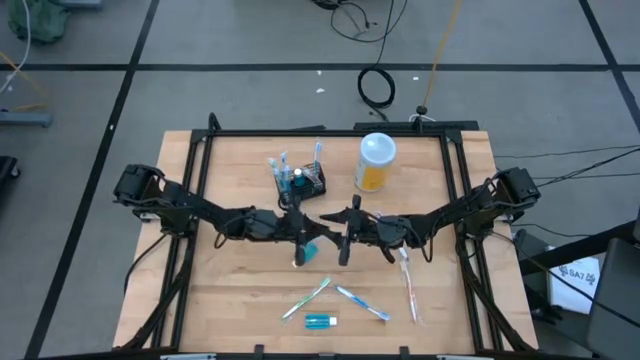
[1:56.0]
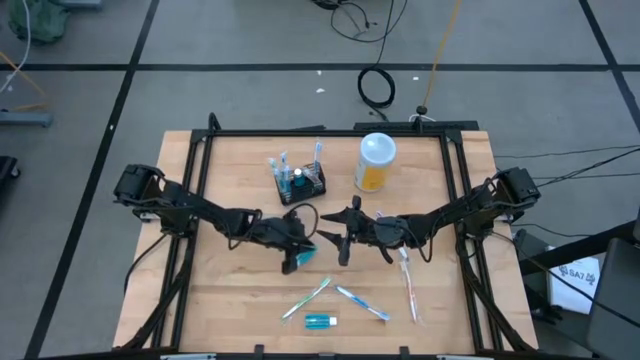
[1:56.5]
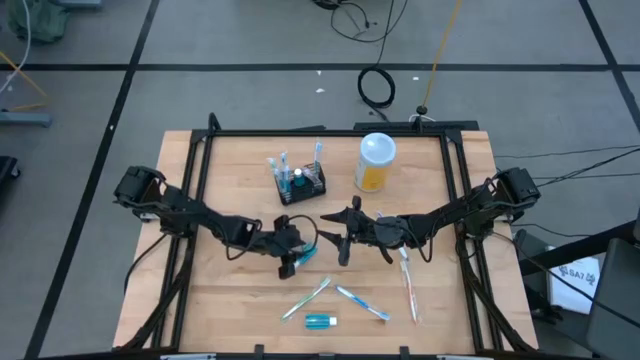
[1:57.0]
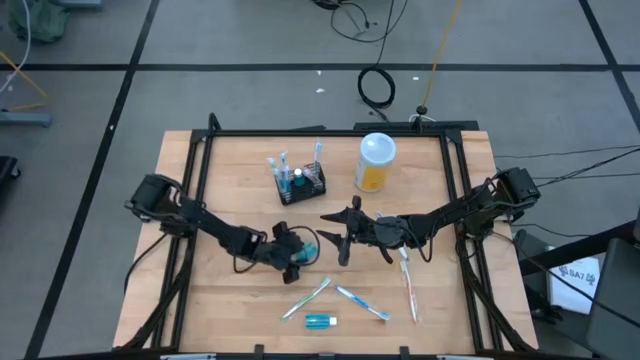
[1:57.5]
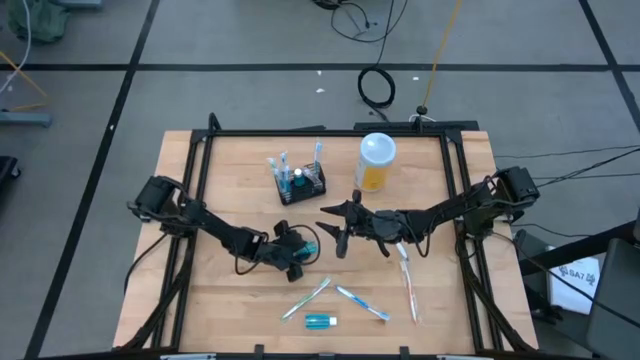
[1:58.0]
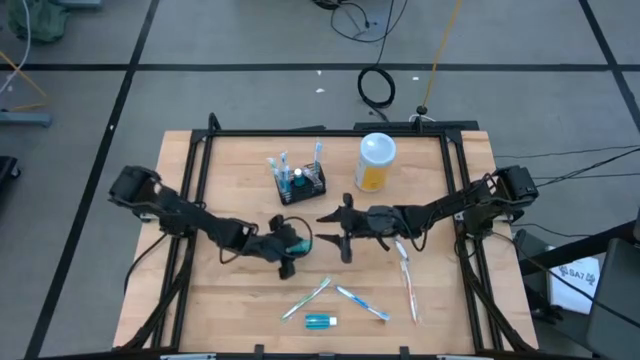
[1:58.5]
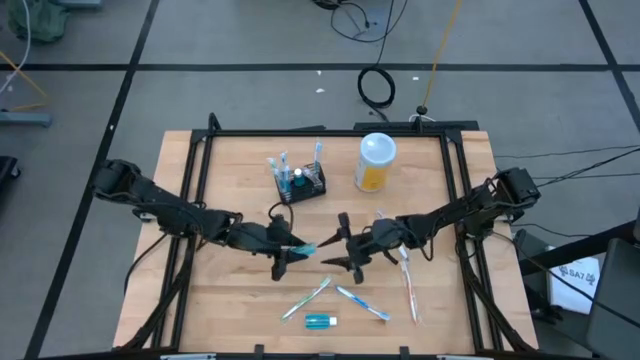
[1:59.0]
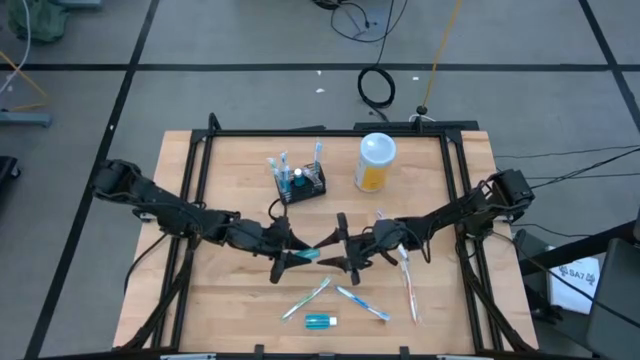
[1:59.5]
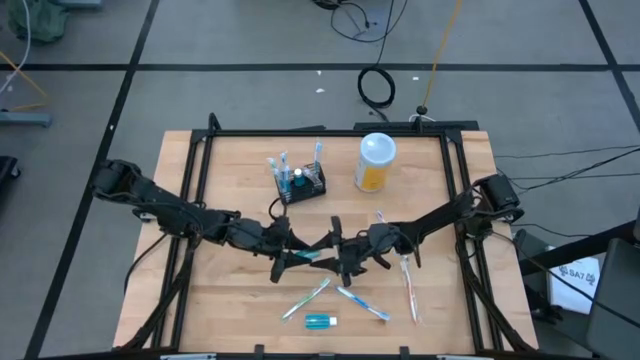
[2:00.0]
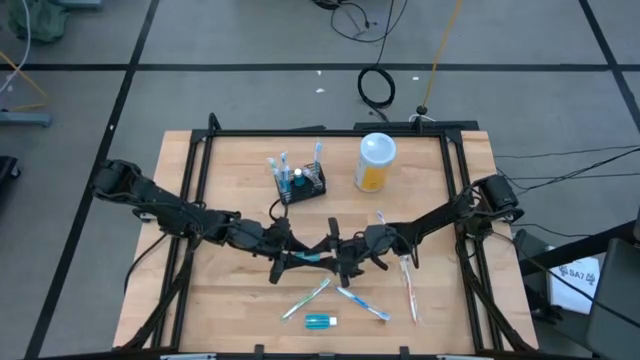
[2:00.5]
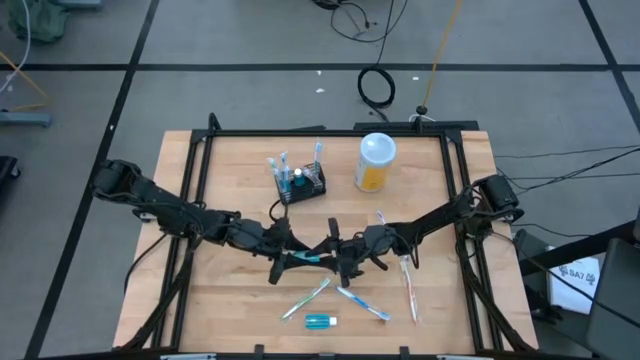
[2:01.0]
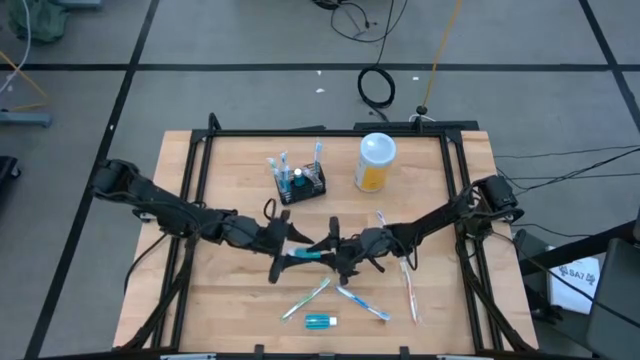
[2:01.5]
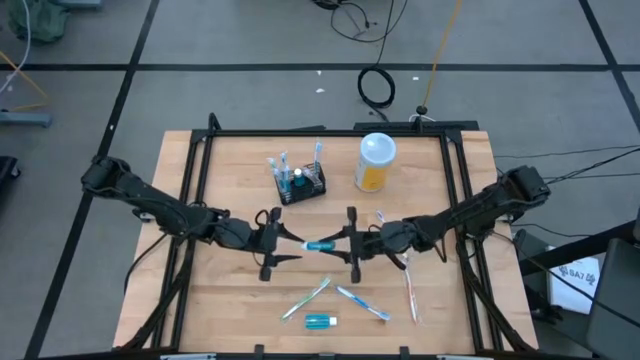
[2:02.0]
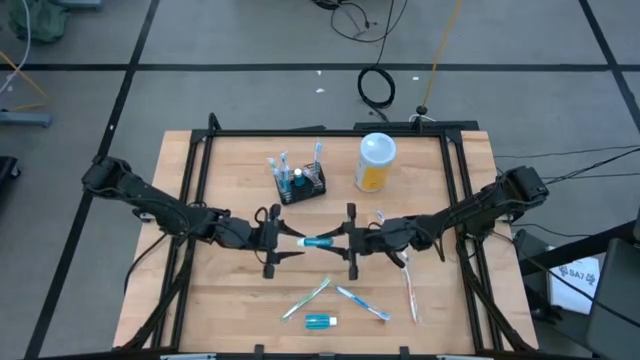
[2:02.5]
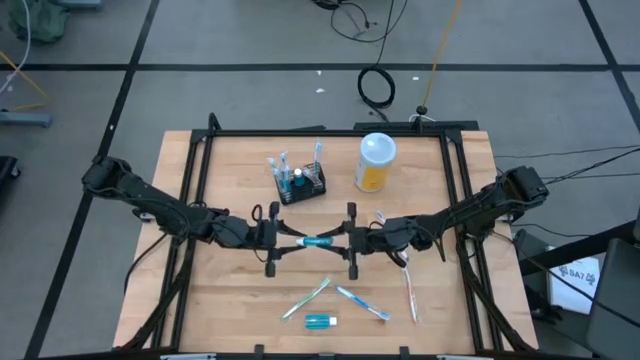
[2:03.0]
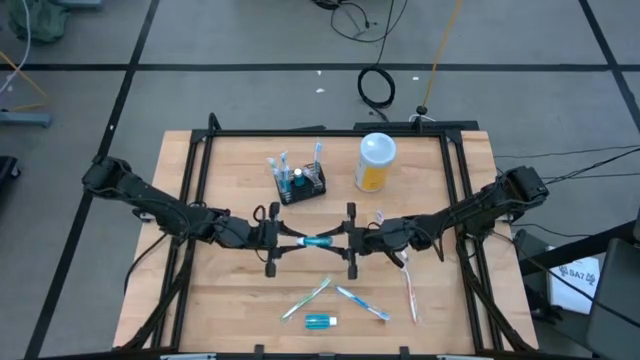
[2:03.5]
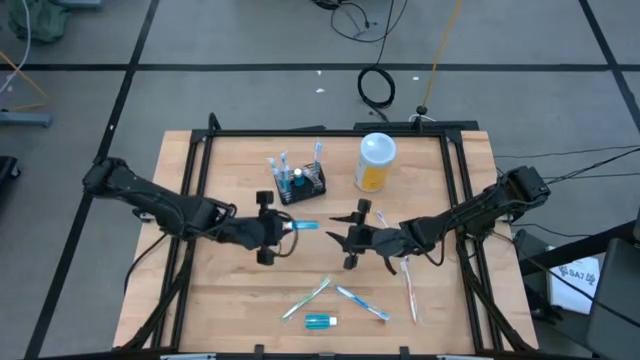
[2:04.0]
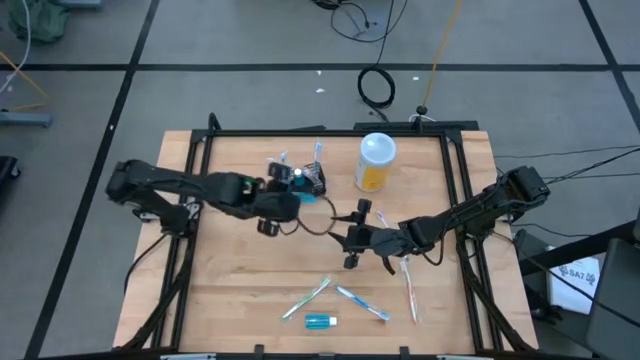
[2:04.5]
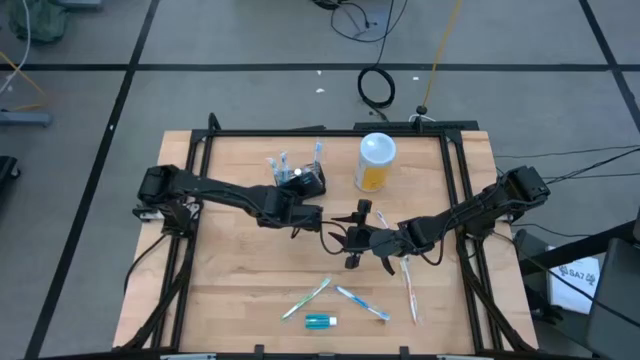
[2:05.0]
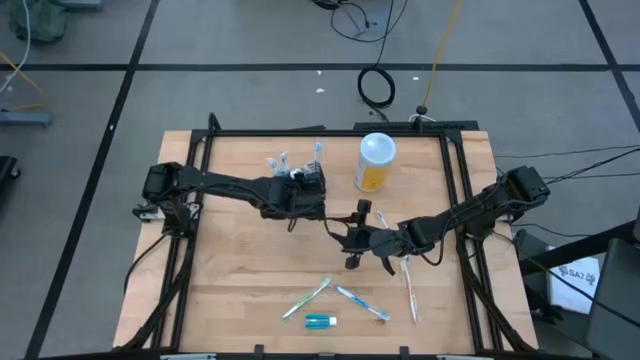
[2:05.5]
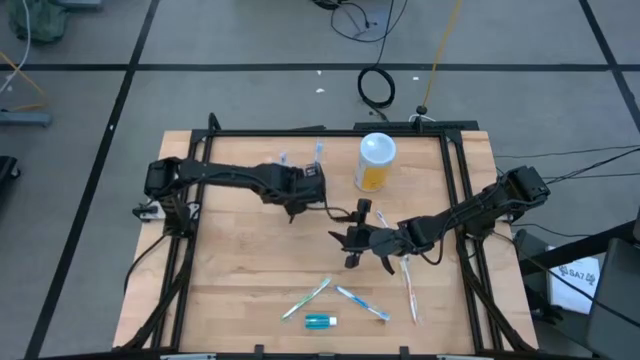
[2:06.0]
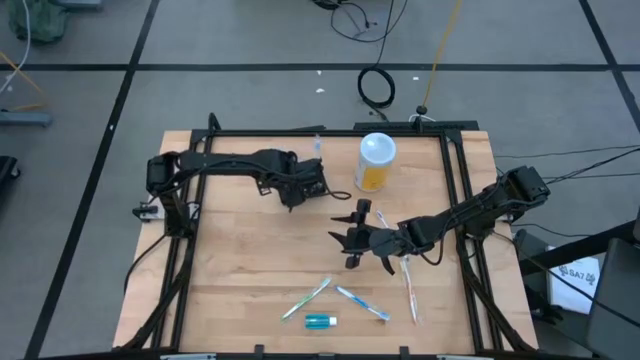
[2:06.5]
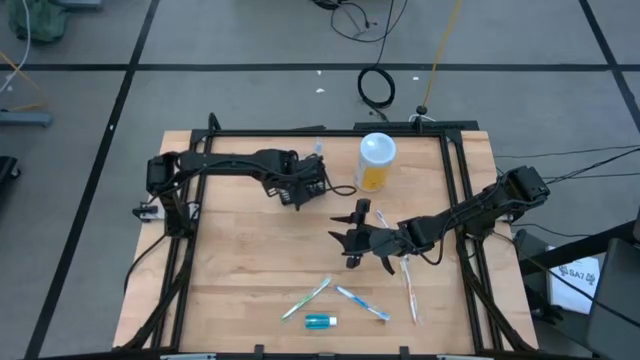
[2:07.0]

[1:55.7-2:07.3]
Task: Pick & Place toothbrushing station
Put the blue mouthwash into the black mesh organizer

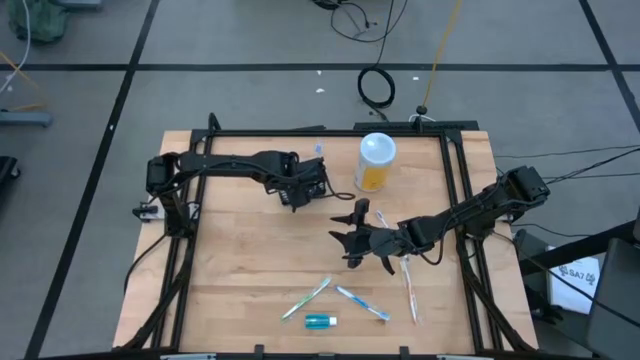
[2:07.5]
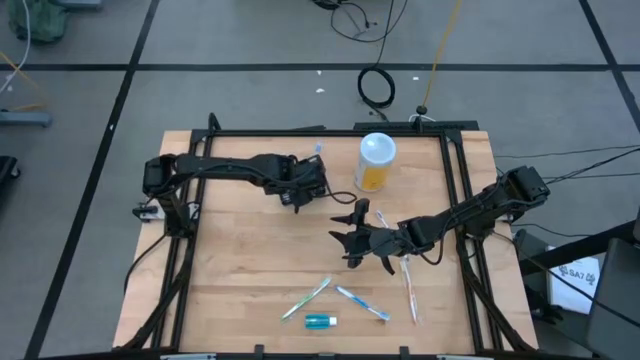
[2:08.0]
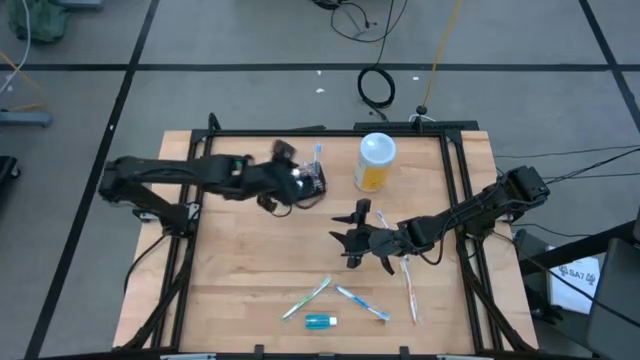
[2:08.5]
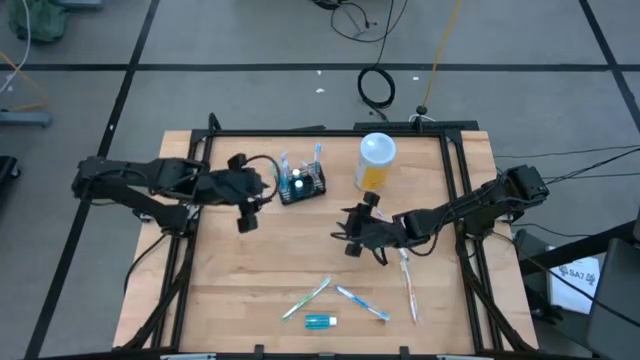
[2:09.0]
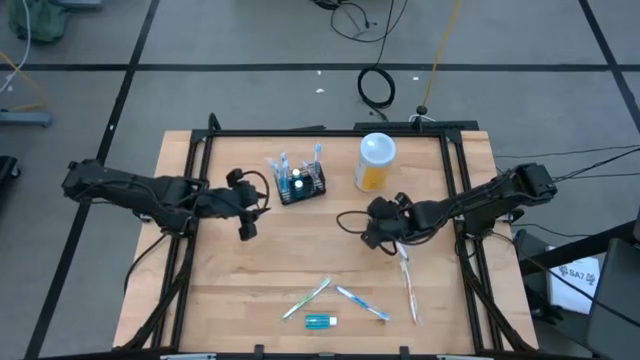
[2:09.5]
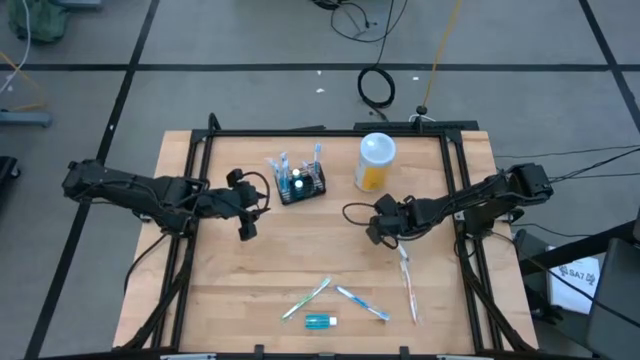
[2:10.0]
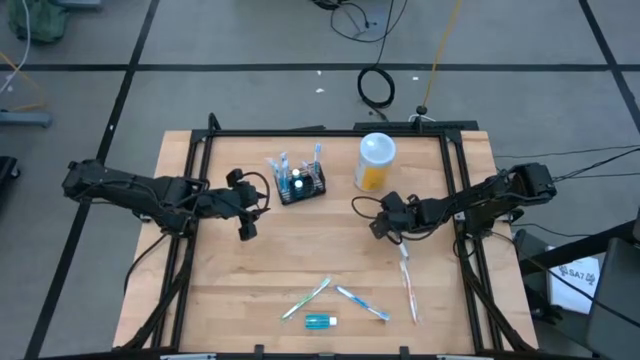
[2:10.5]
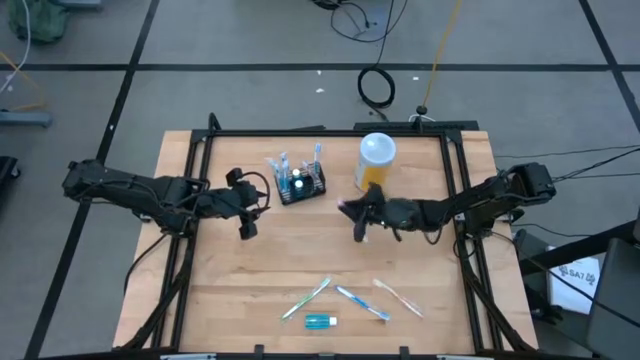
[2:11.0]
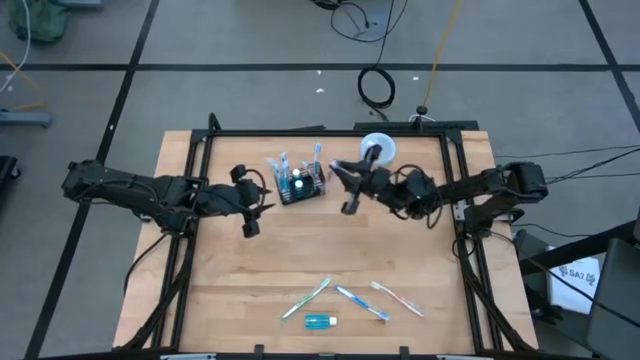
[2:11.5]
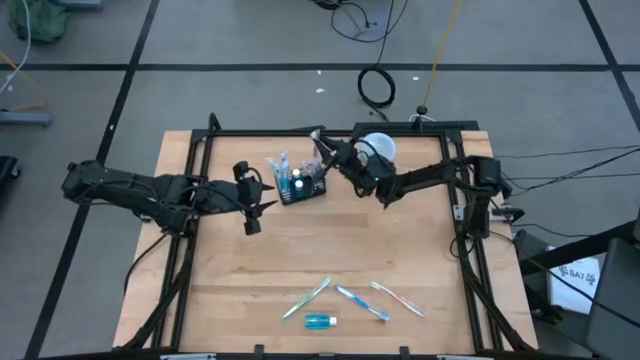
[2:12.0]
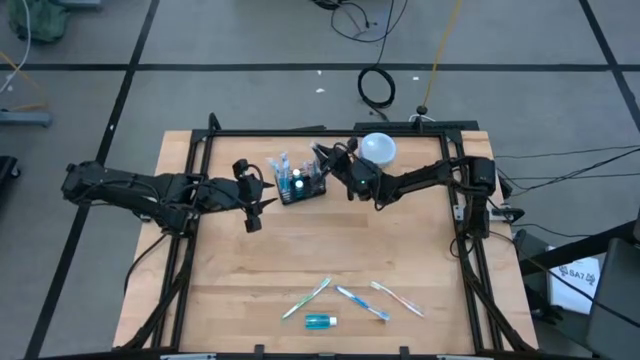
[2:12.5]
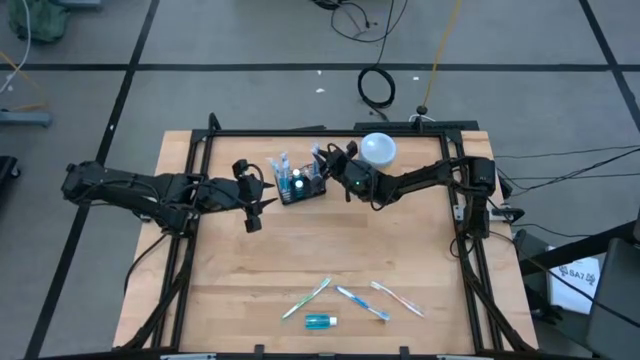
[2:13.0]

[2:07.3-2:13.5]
Put the purple toothbrush into the black mesh organizer

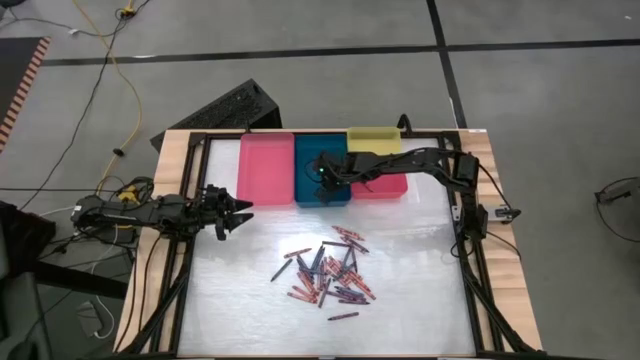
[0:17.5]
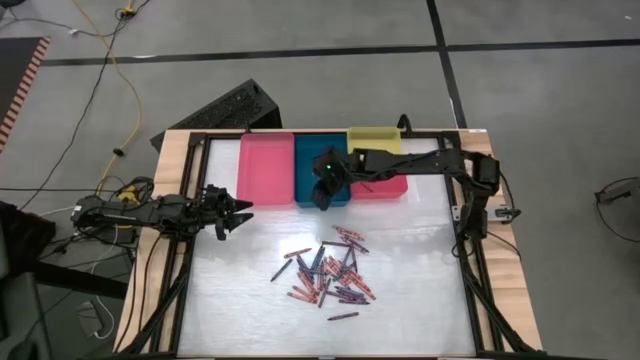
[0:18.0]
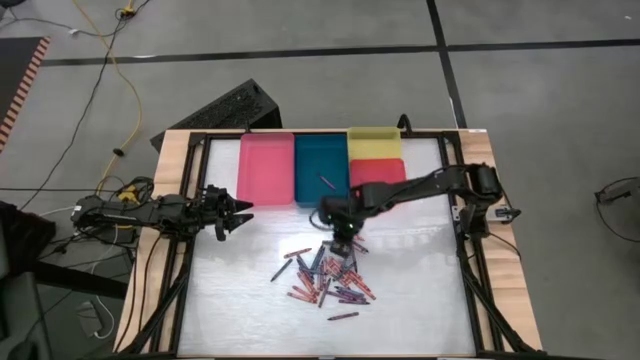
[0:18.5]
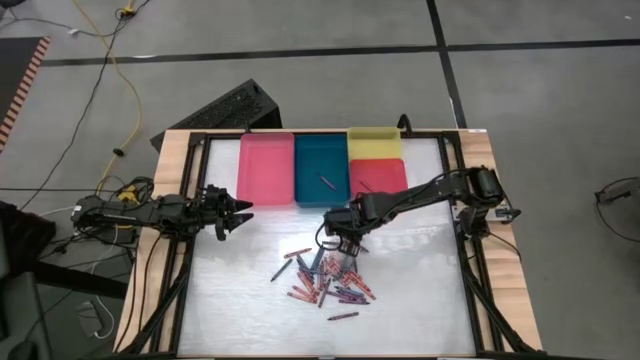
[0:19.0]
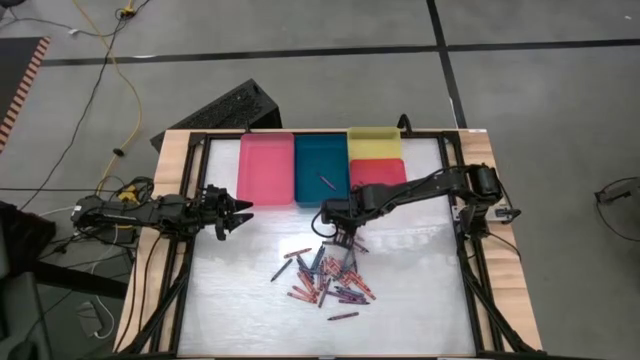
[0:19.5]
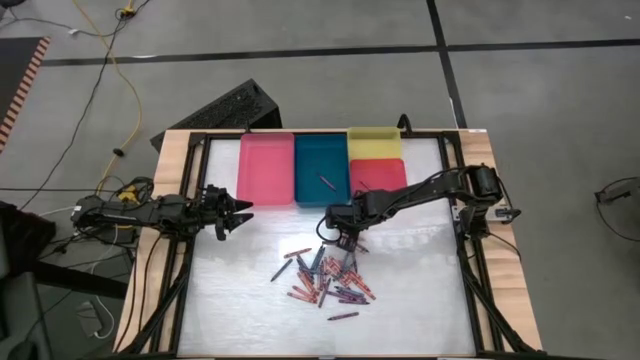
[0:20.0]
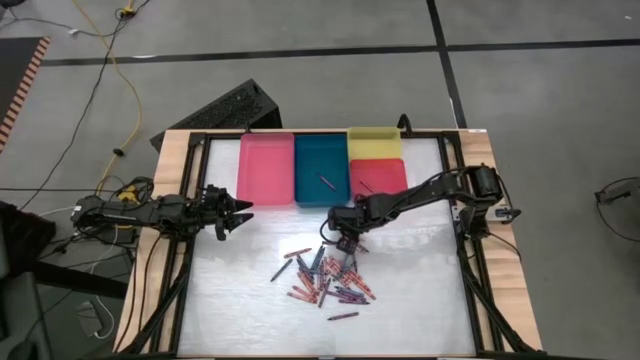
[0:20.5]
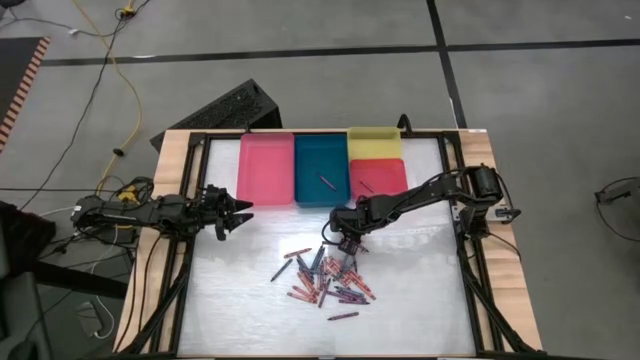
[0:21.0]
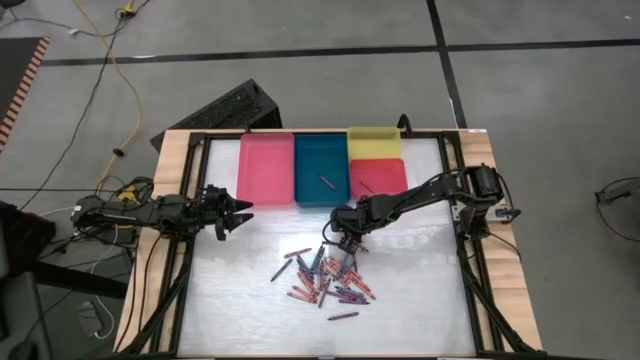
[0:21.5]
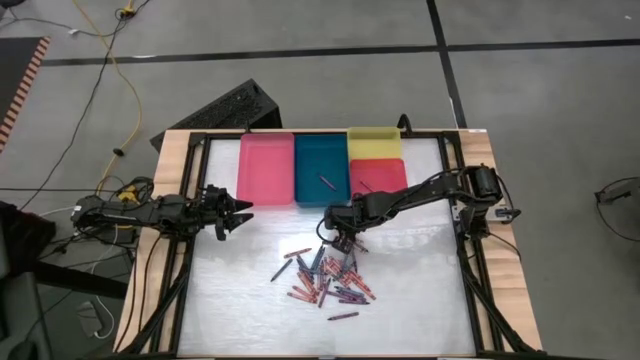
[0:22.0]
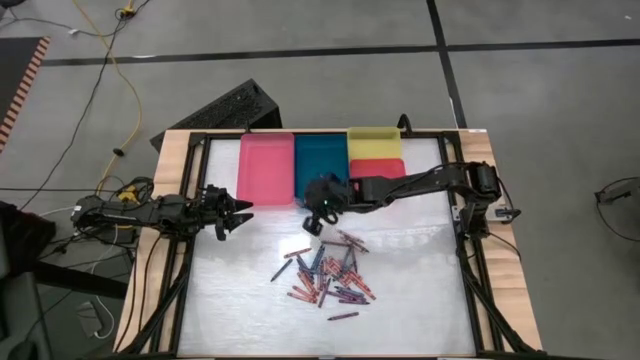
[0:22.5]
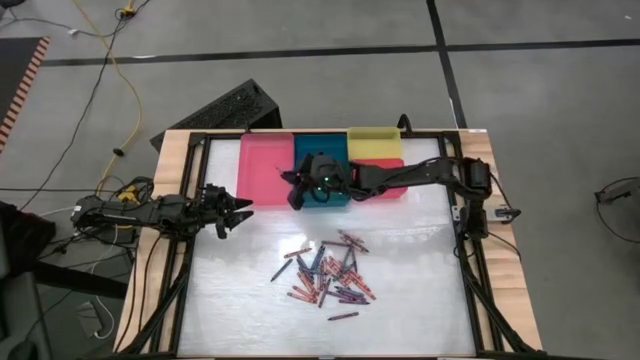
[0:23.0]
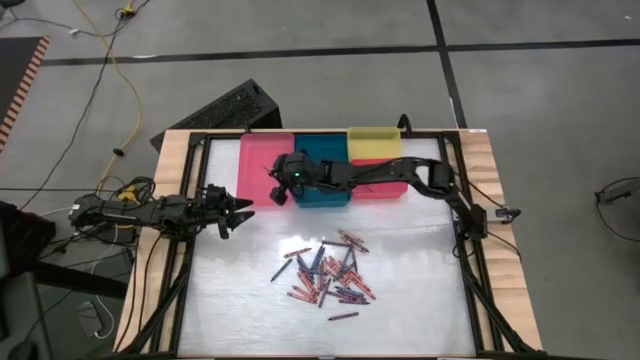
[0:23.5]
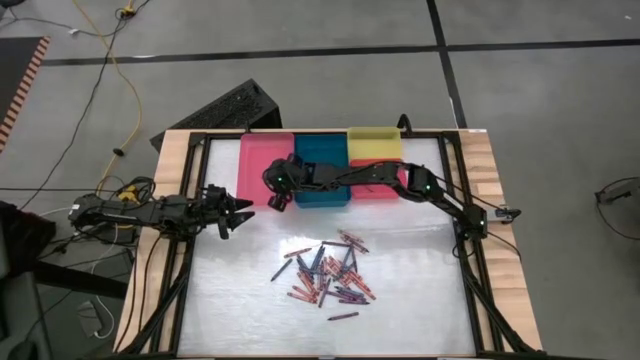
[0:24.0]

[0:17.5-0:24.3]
Task: Sort crayons
Put the pink crayon into the pink bin
